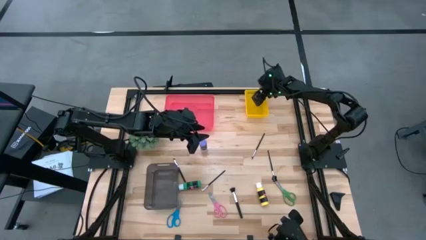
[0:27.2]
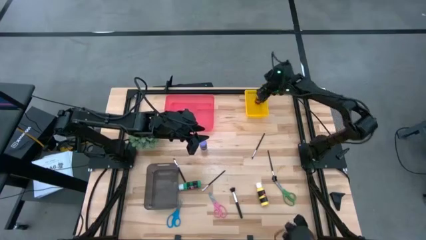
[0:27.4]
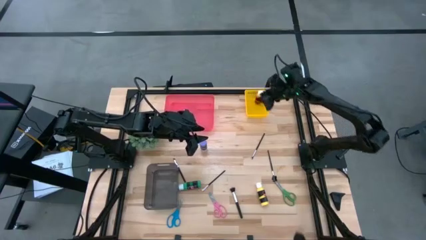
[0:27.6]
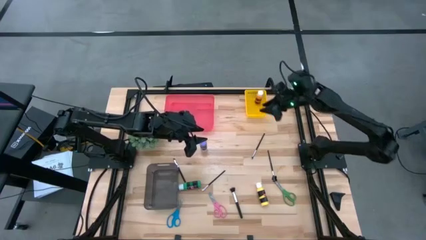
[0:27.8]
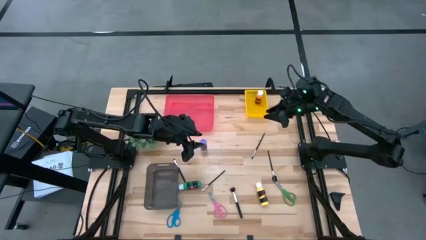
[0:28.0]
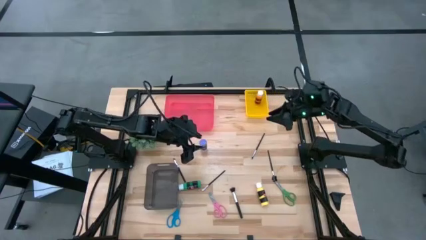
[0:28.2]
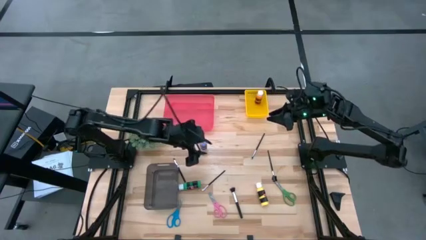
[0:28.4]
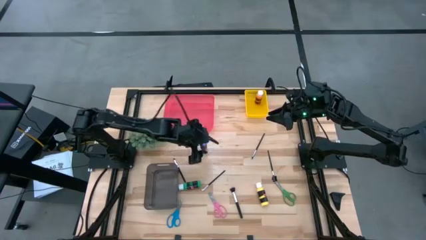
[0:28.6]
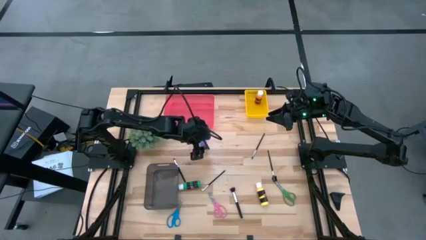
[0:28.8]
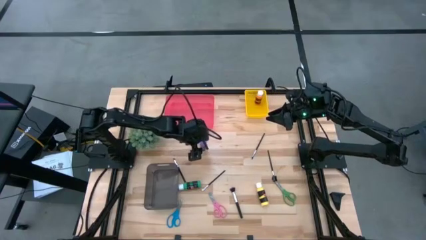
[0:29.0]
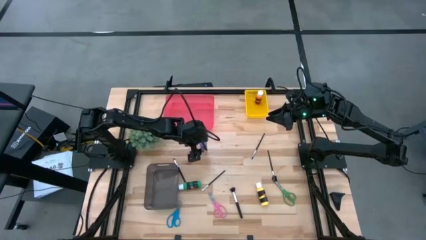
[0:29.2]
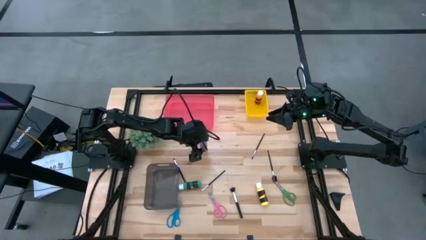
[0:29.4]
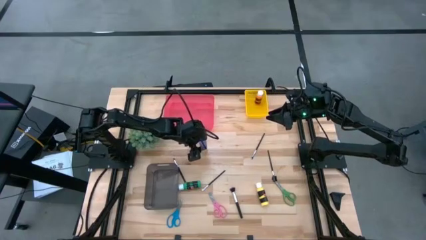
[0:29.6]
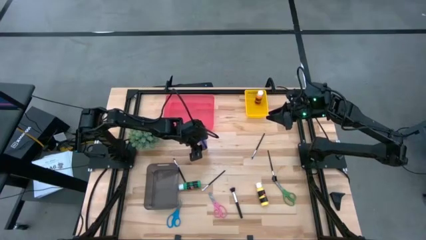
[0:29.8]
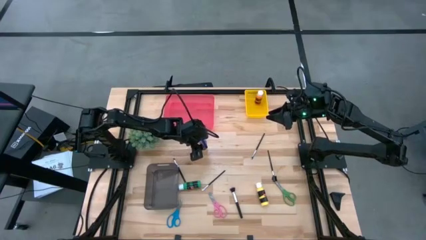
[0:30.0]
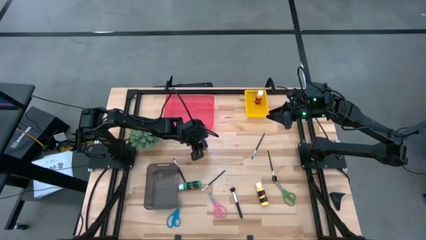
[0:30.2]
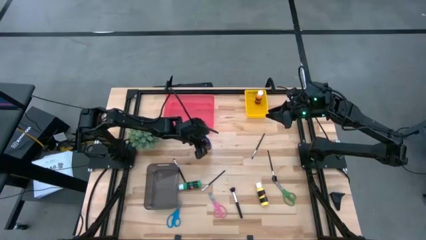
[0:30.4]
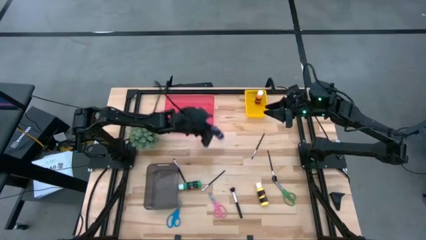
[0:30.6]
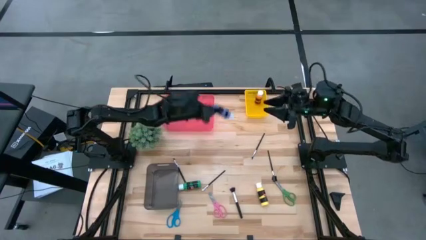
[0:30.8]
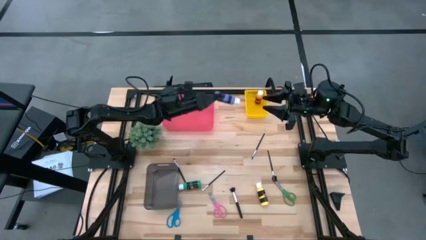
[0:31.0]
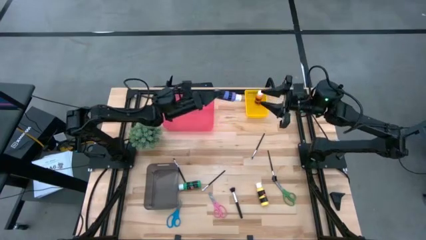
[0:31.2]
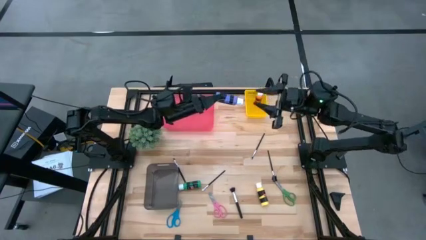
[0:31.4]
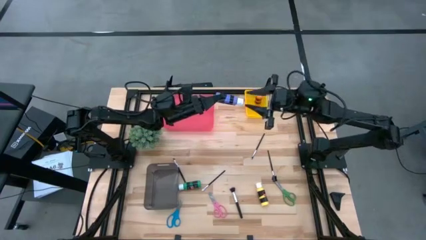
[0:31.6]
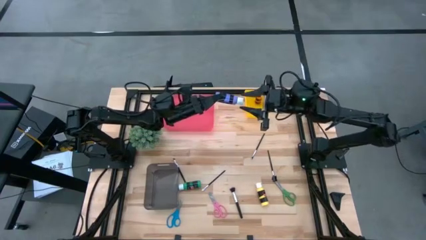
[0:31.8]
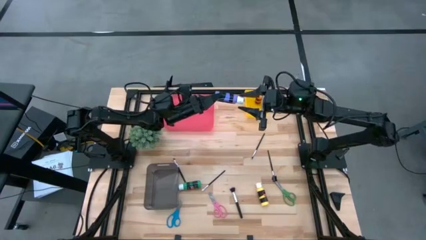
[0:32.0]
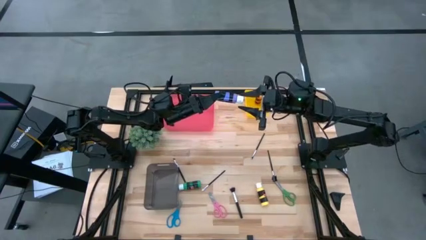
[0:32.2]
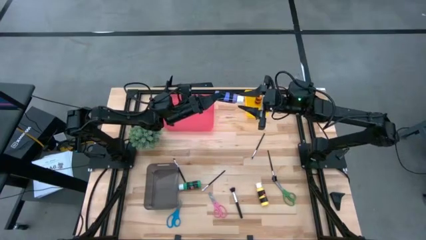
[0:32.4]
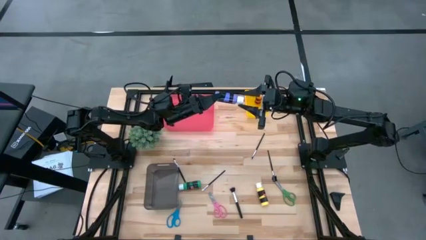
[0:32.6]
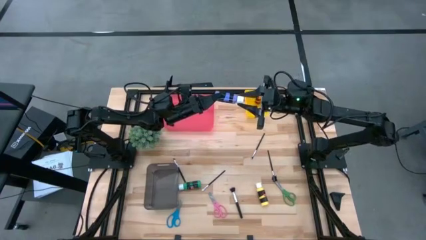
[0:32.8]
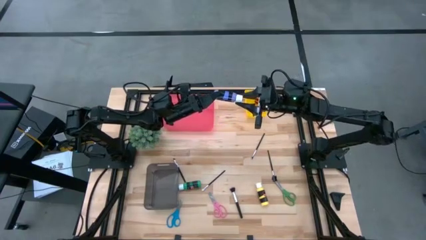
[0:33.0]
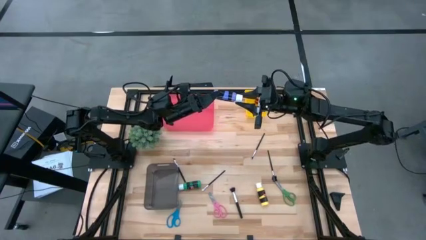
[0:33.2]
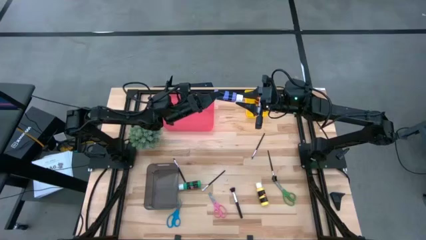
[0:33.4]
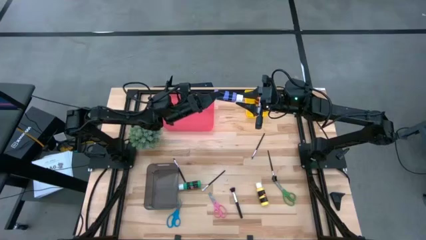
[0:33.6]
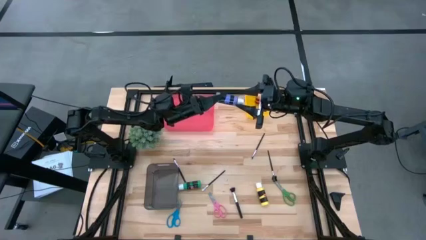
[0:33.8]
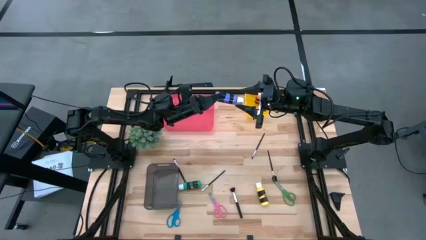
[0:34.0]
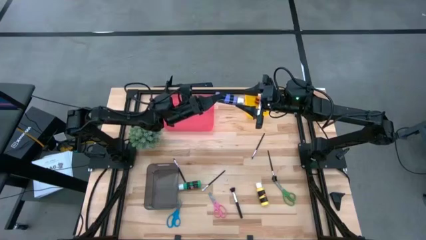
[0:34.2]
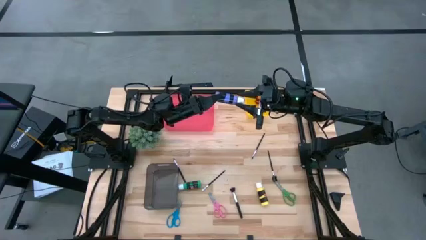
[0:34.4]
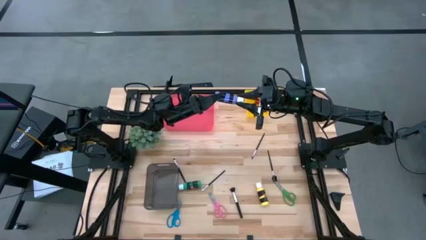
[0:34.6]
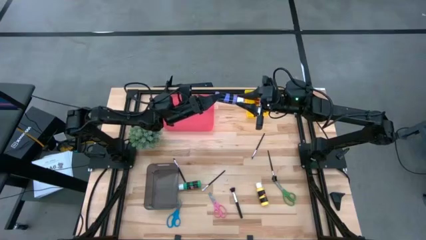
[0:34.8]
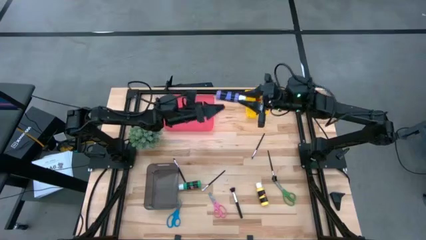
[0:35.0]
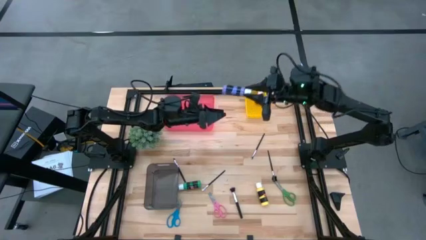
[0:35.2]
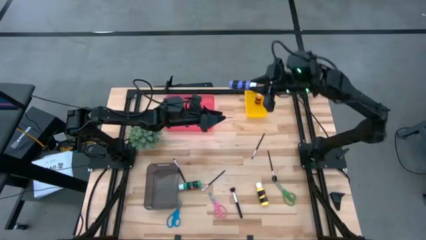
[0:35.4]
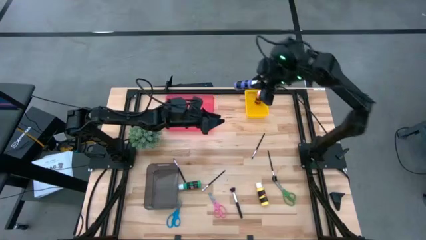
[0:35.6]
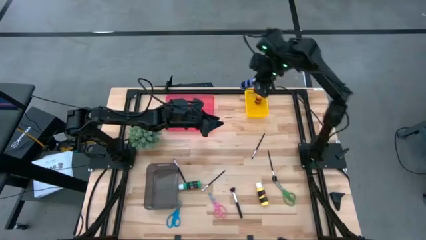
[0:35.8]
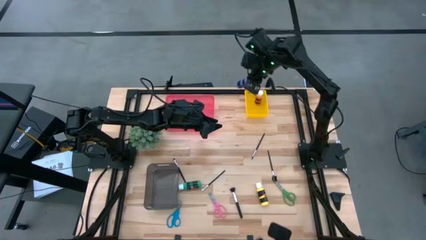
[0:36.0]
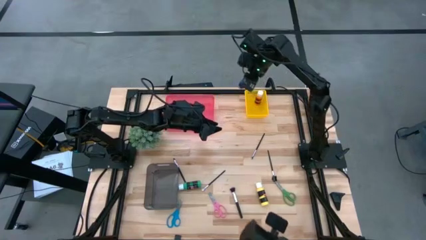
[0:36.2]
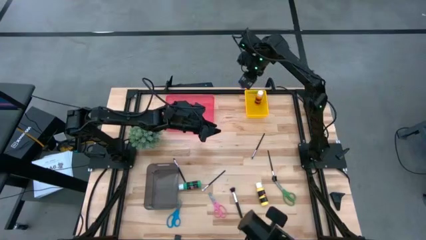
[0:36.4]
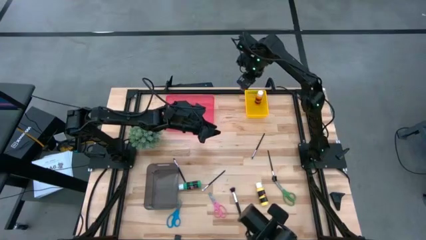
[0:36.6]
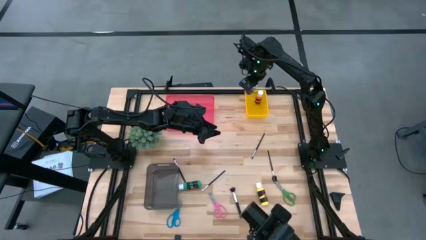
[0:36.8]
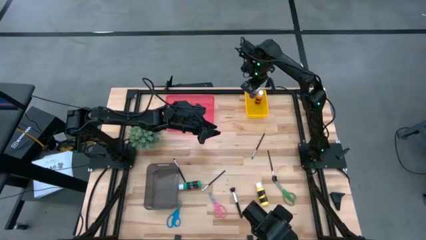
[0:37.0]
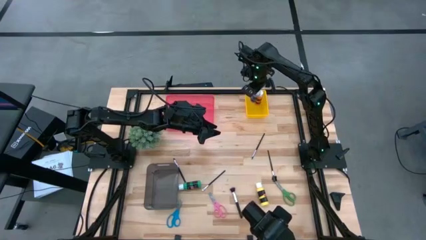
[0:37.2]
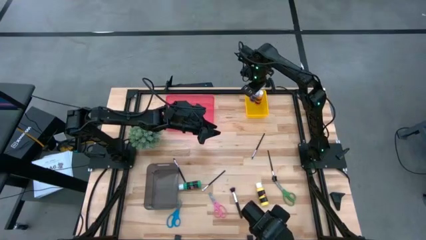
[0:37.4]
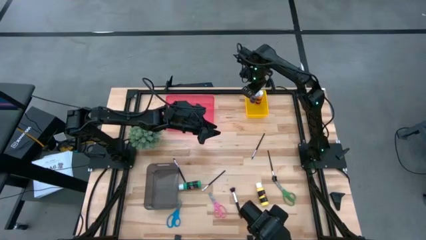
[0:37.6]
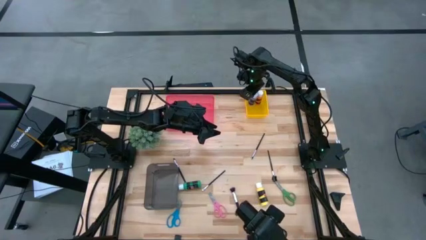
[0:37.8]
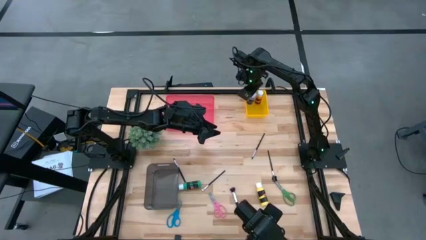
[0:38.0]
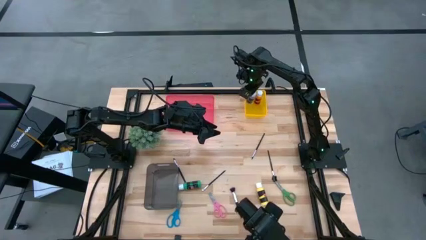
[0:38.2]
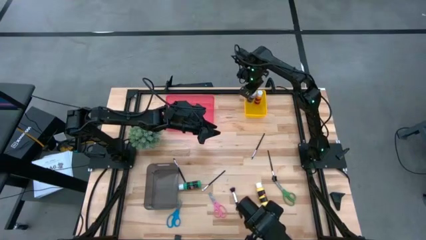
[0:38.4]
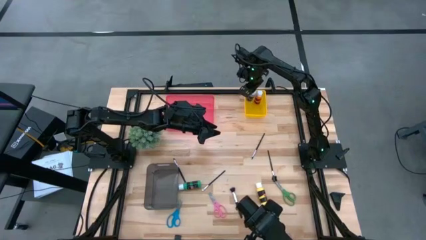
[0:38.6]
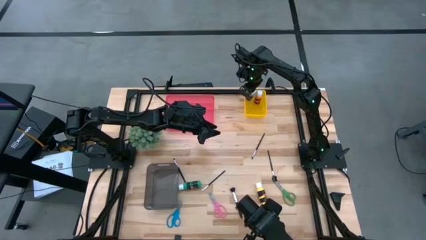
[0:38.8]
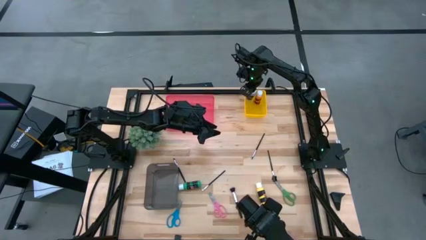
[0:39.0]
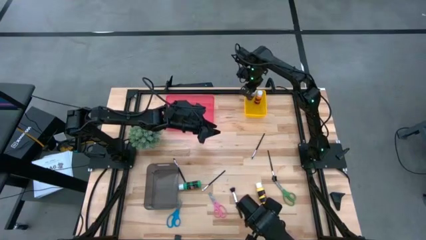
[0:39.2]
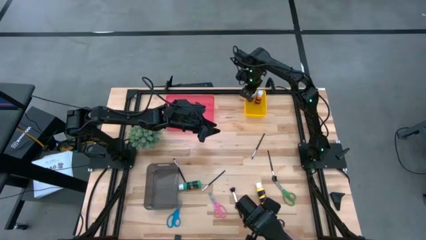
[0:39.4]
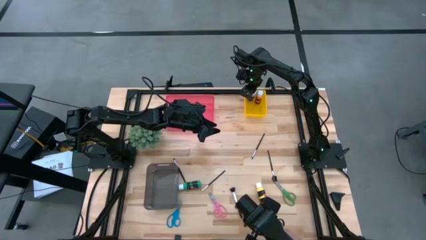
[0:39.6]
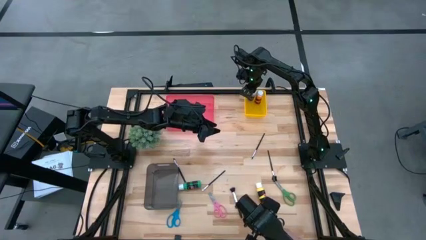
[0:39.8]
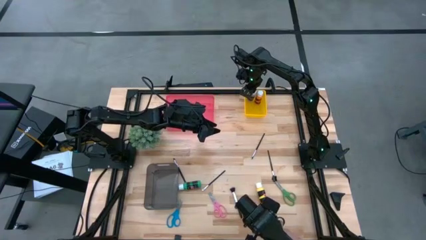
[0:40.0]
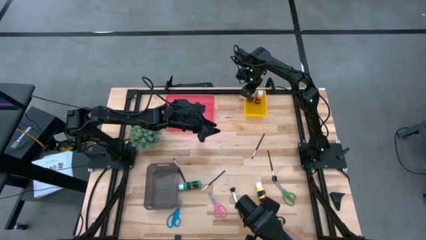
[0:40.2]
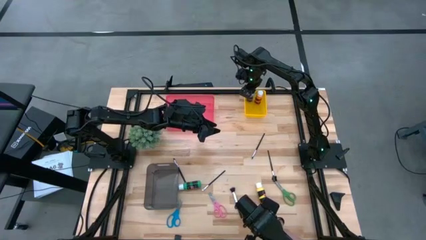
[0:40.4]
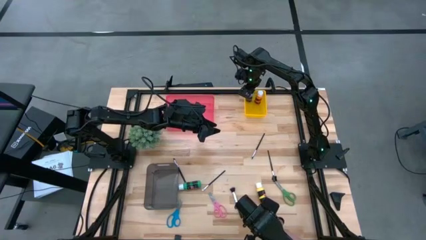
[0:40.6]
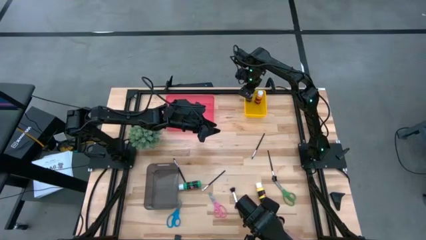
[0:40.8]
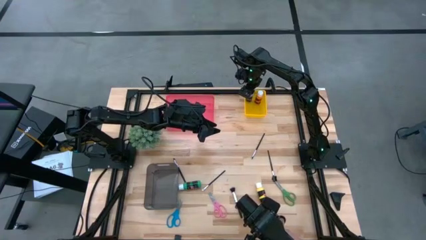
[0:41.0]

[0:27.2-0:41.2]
Task: Pick & Place Paint Supplies
Put the blue paint bottle into the yellow bin

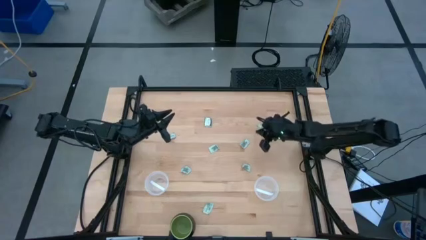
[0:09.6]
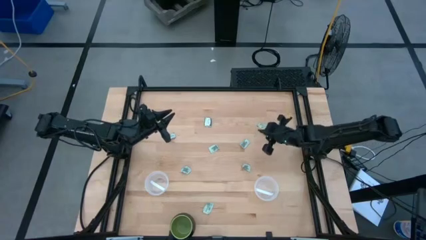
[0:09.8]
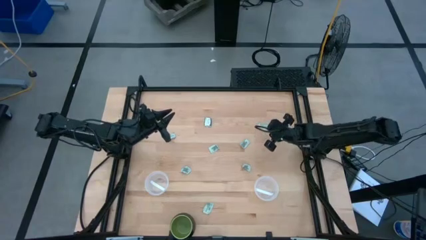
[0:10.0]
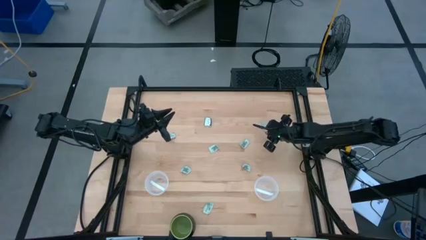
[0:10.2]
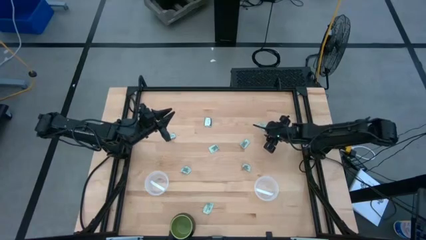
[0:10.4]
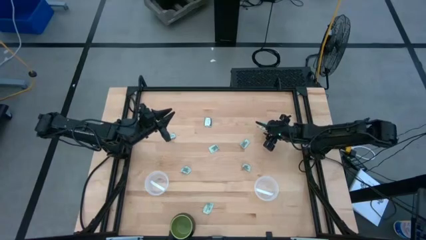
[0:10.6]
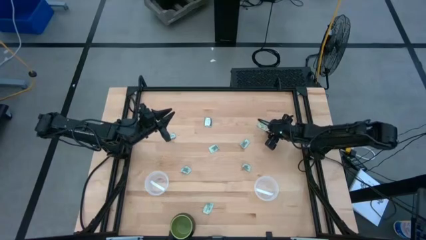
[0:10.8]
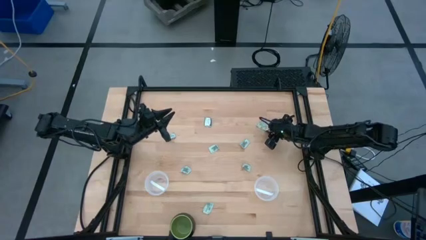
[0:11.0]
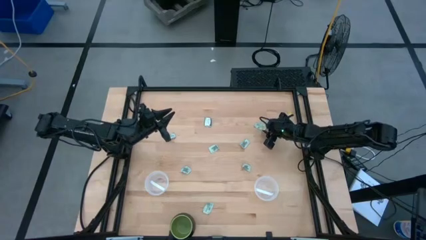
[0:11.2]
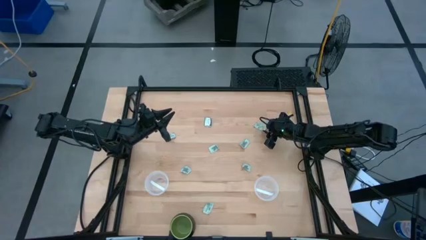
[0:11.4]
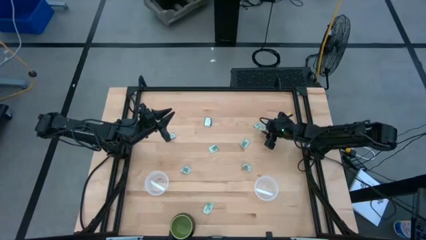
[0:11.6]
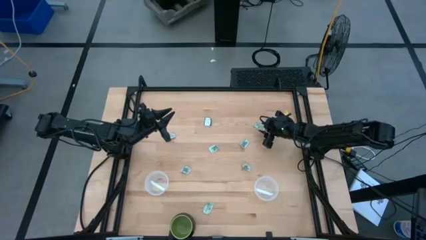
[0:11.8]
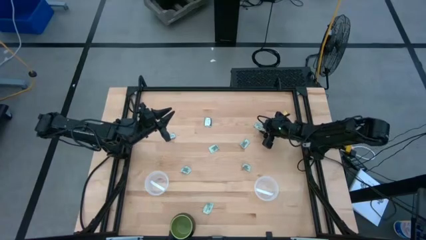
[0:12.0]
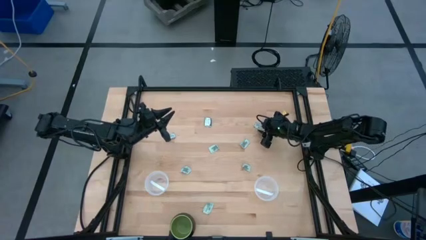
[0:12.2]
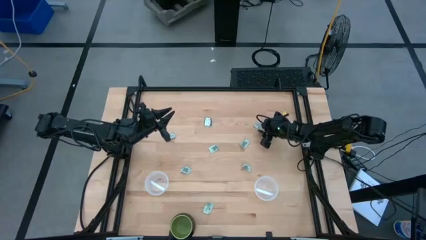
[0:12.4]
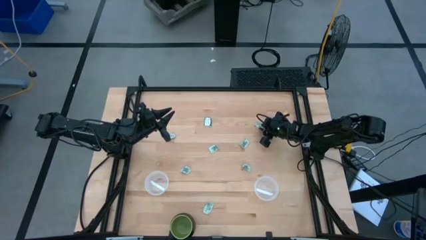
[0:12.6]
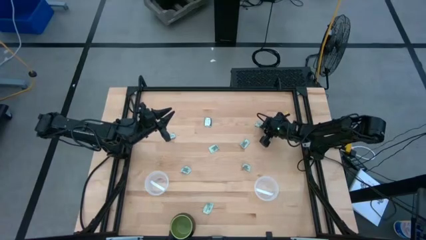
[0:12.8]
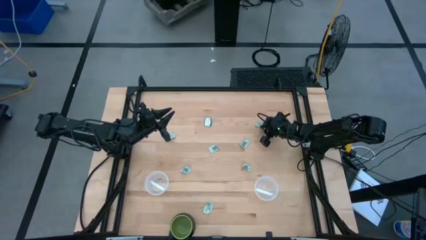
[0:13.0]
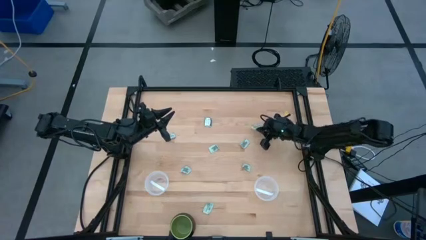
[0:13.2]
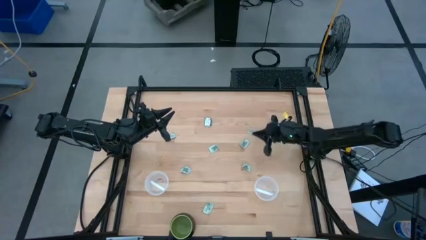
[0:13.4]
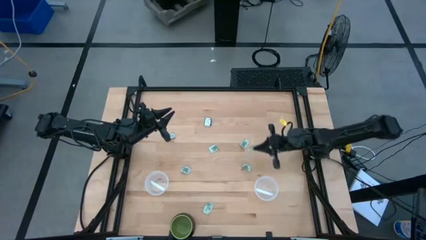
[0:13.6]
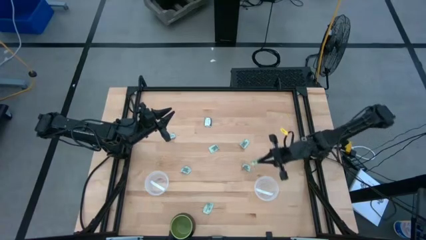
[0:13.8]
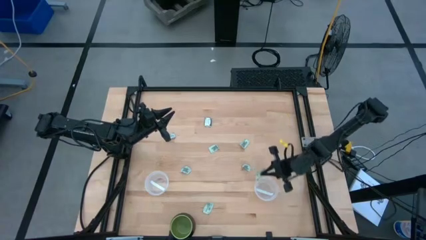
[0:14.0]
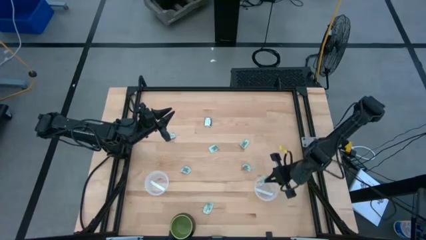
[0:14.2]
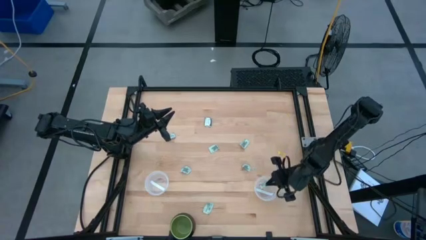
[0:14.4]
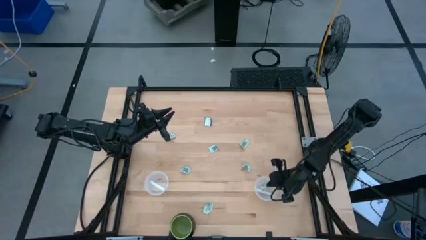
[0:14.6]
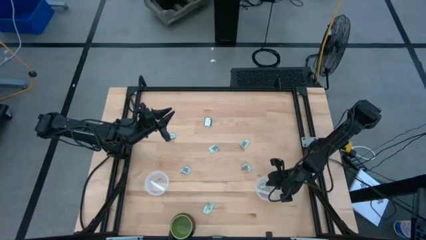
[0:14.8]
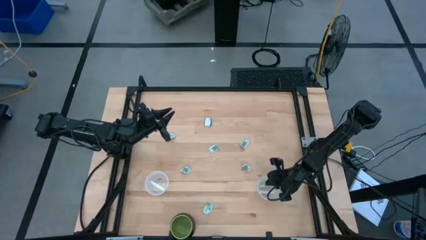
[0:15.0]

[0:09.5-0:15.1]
Task: Pick and place Stevia / Truvia into bins
Put the white stevia packet into the right transparent container
